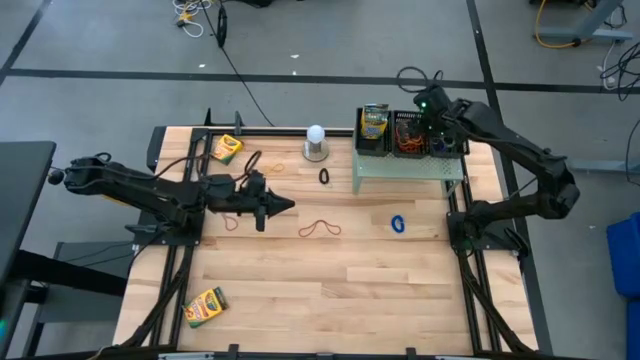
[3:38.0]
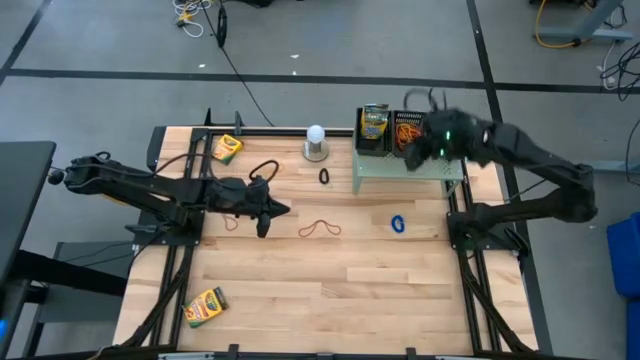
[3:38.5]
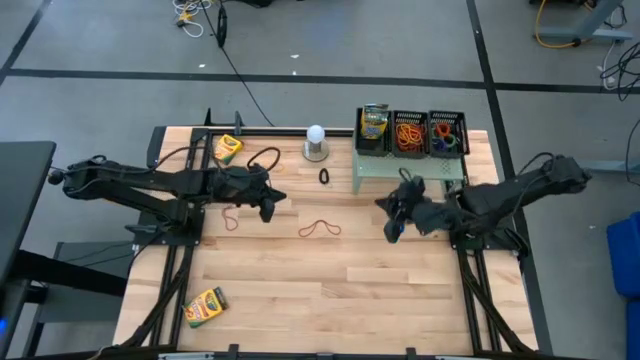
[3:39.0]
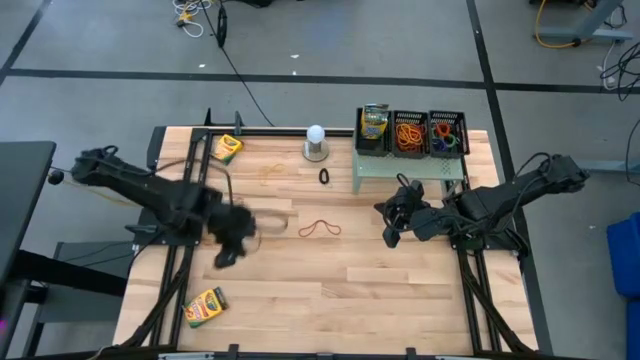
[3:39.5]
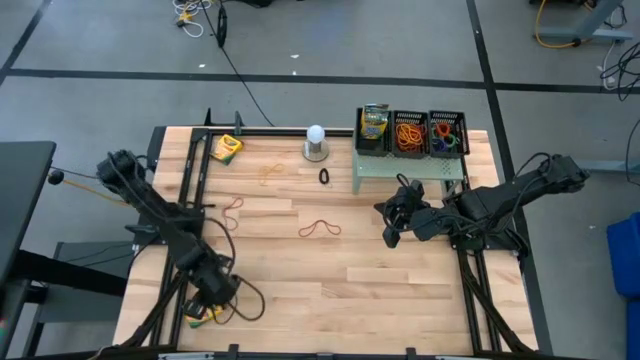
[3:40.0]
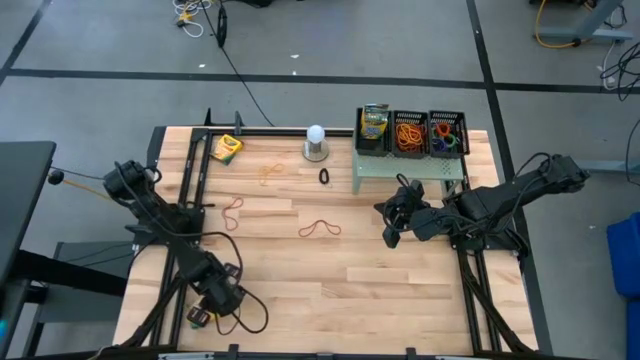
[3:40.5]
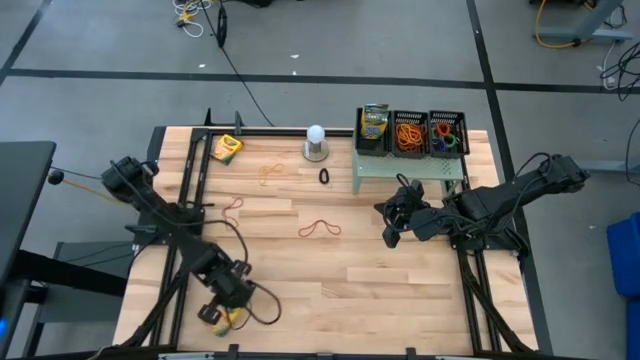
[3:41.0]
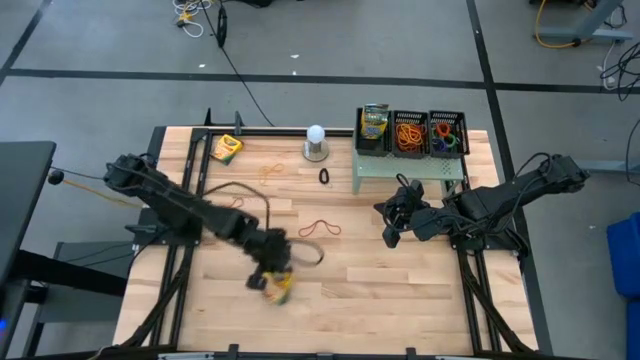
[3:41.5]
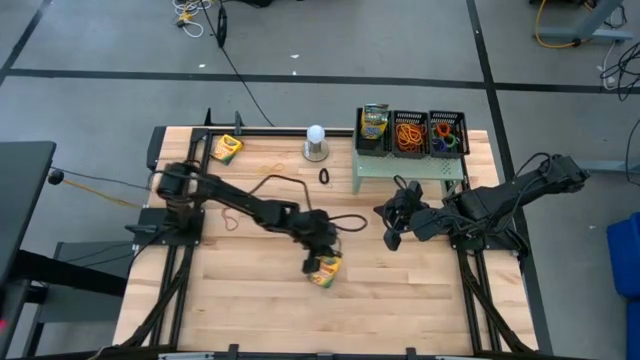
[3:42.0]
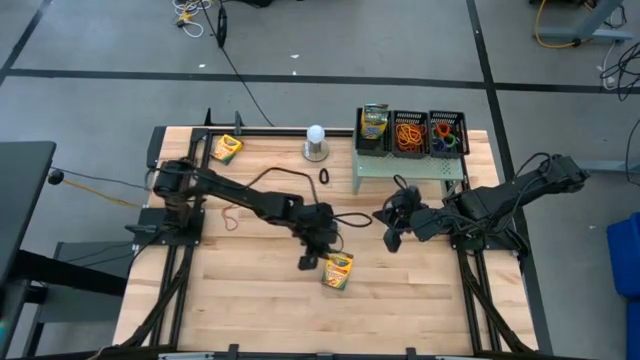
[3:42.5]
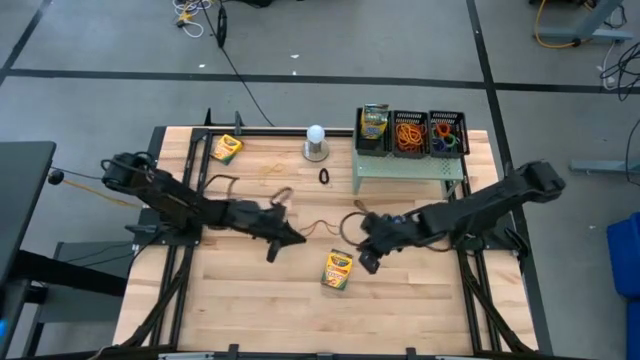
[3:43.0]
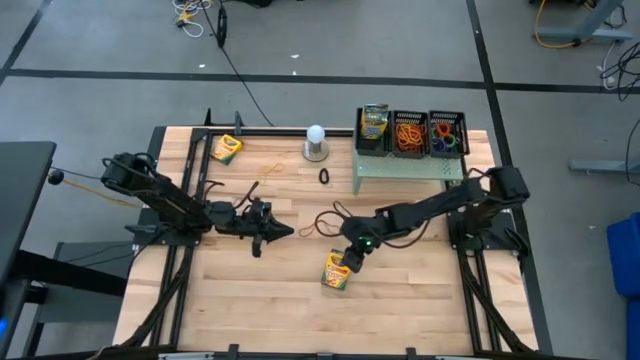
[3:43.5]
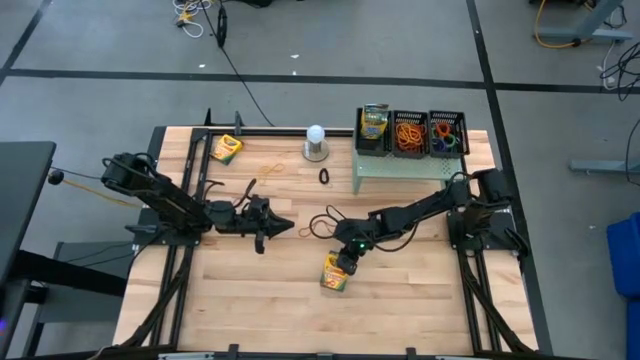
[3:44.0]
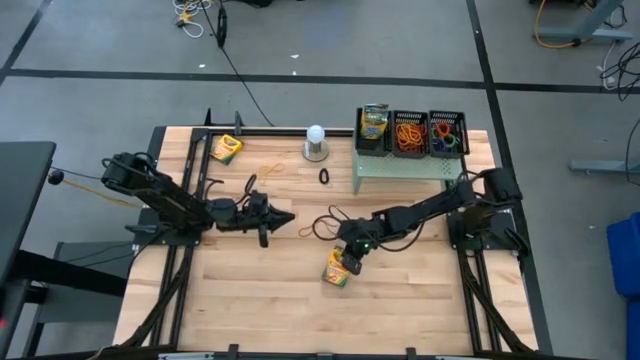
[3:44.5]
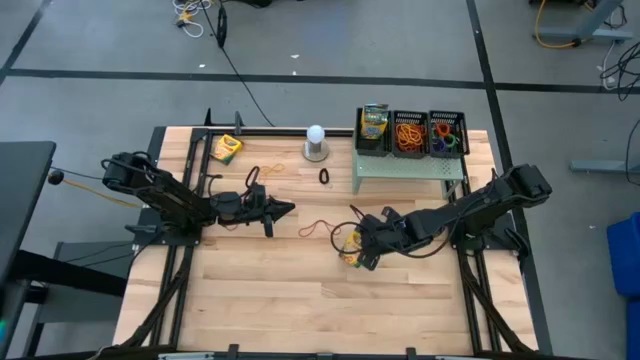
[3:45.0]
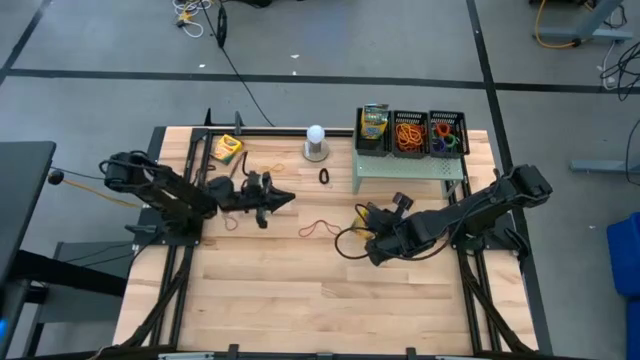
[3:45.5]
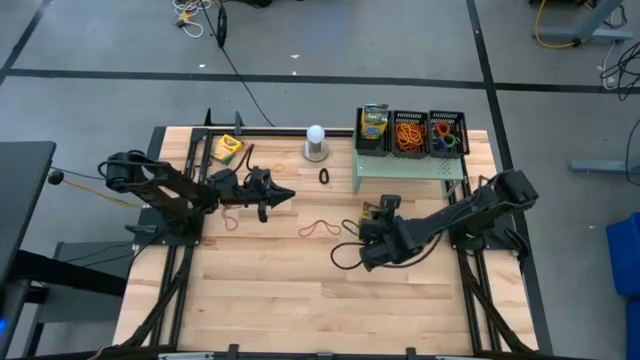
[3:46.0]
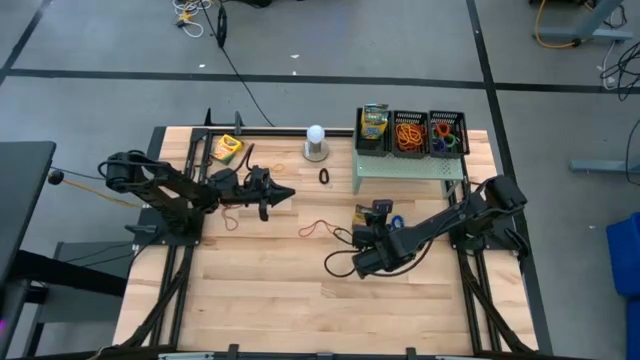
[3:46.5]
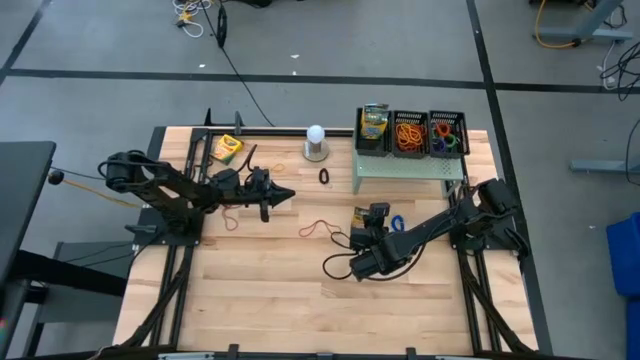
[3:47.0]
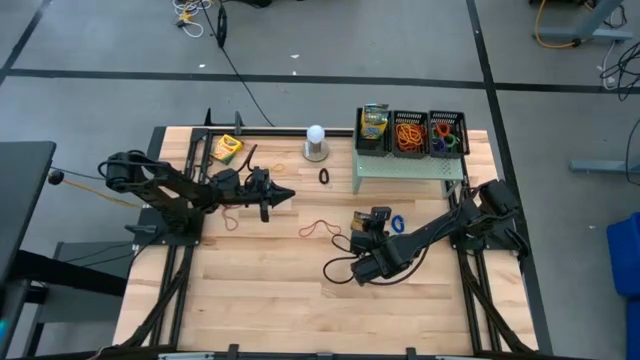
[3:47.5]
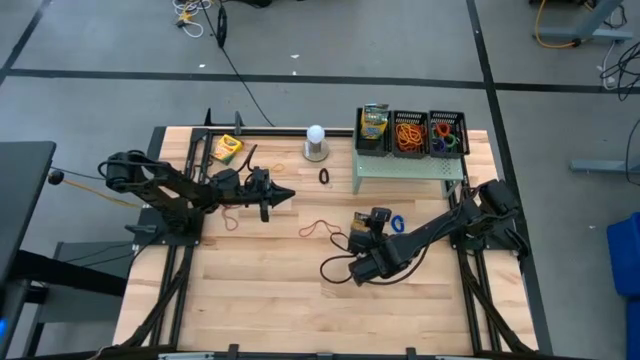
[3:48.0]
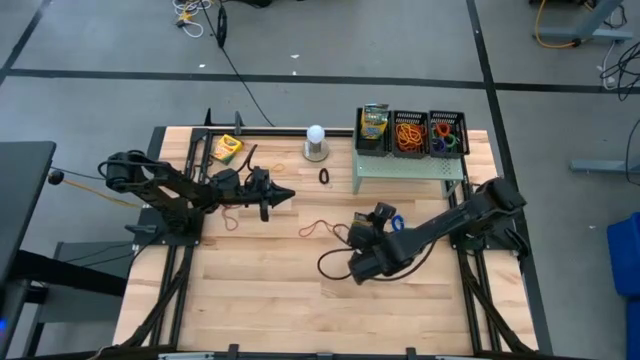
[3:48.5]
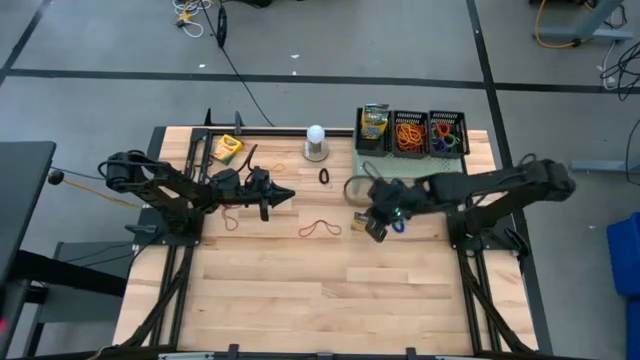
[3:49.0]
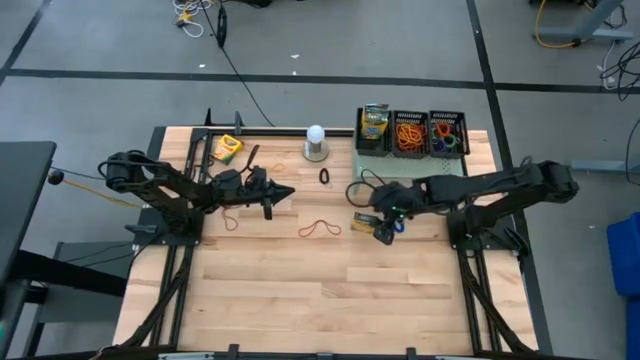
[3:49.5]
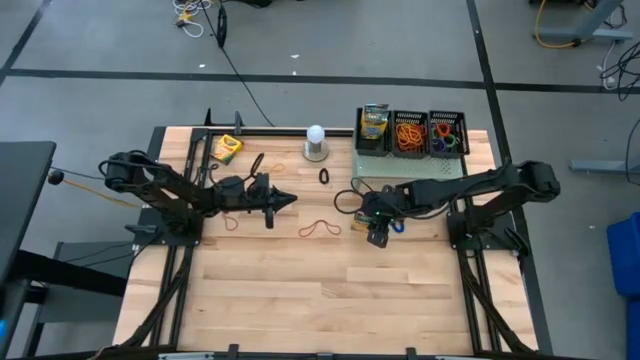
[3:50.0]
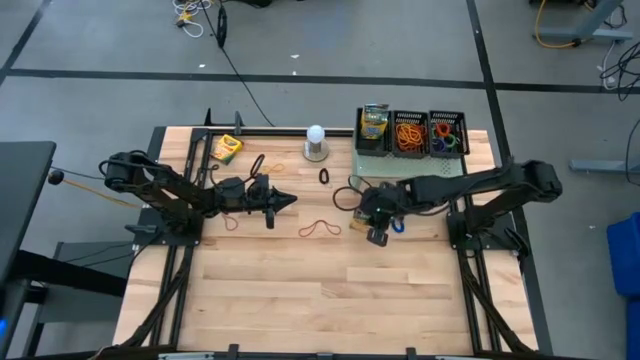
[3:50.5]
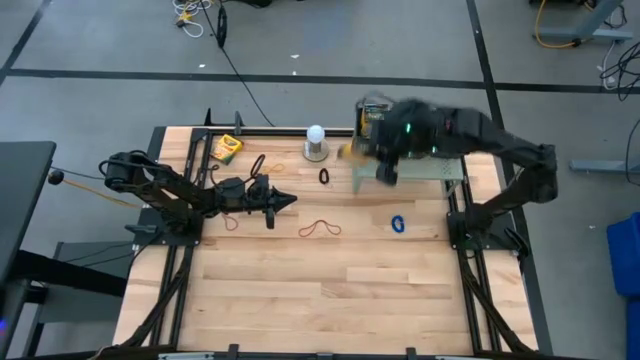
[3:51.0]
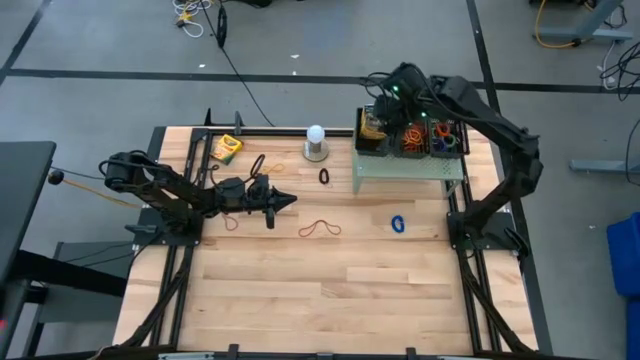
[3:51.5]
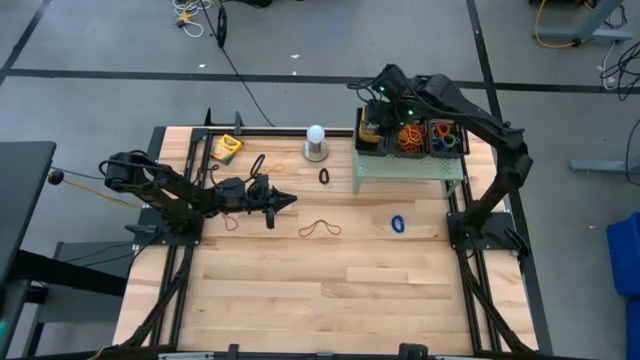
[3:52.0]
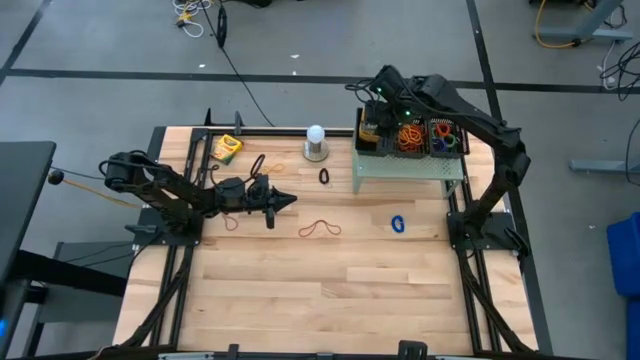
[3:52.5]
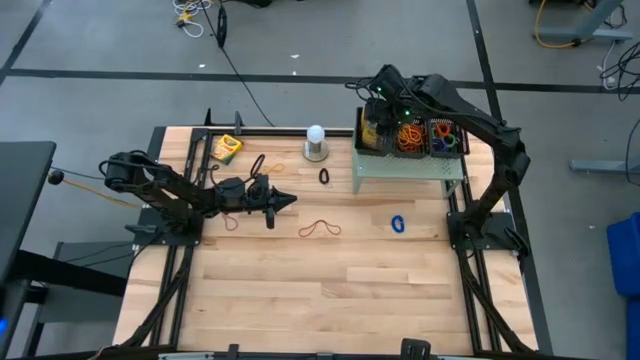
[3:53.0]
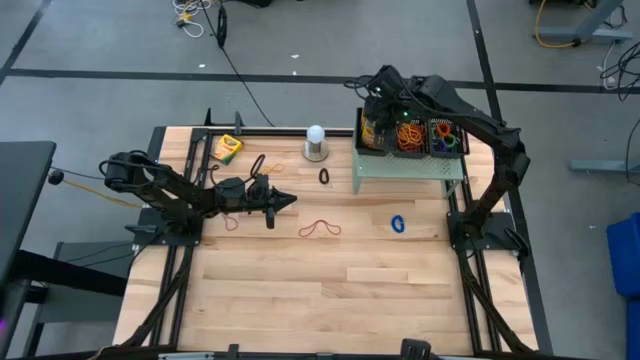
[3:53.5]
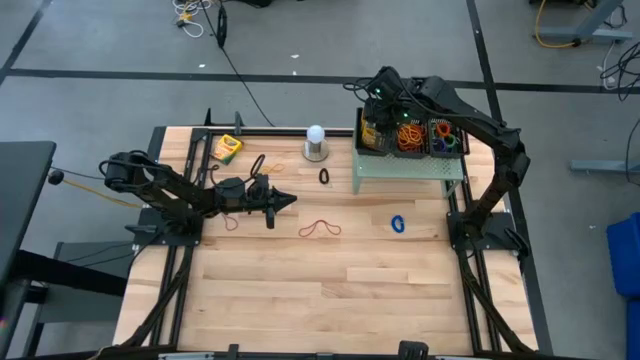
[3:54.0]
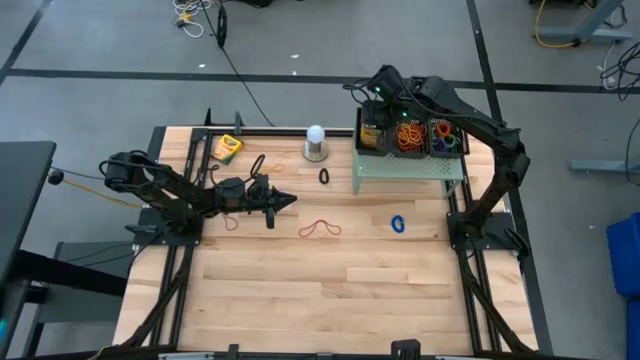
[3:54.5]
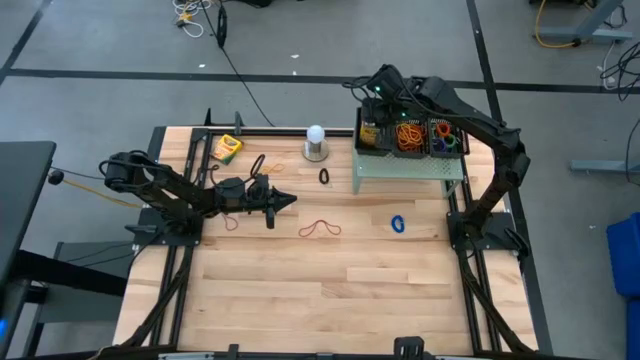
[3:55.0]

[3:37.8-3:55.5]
Task: Pick & Place Office Desk Supplies
Put the bottom crayon box into the left basket on the shelf

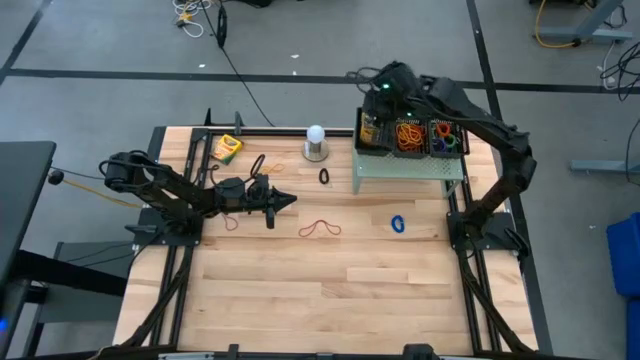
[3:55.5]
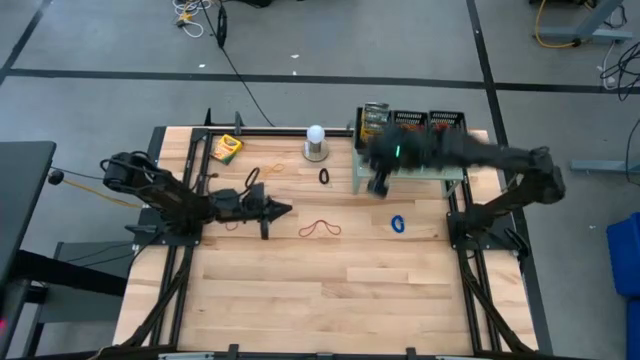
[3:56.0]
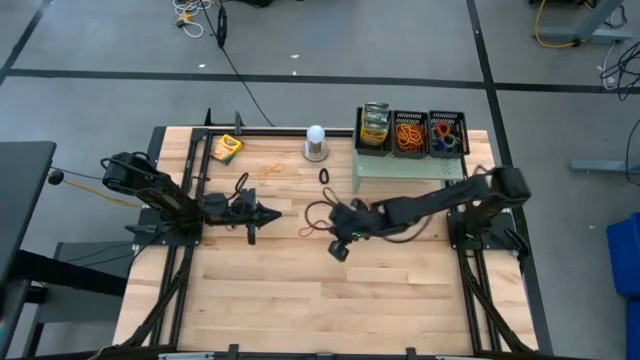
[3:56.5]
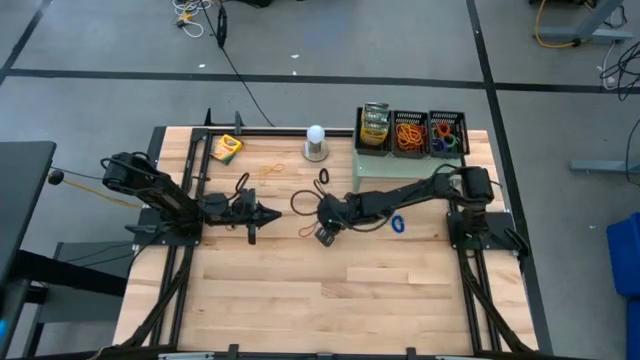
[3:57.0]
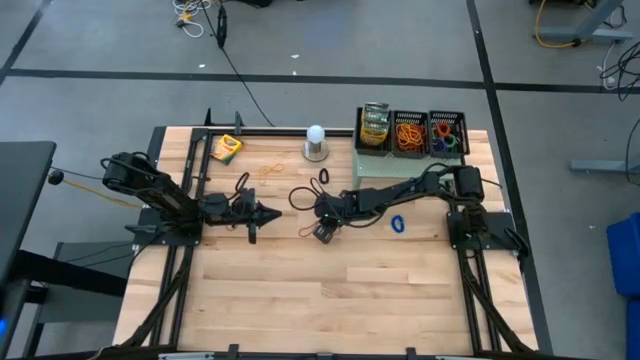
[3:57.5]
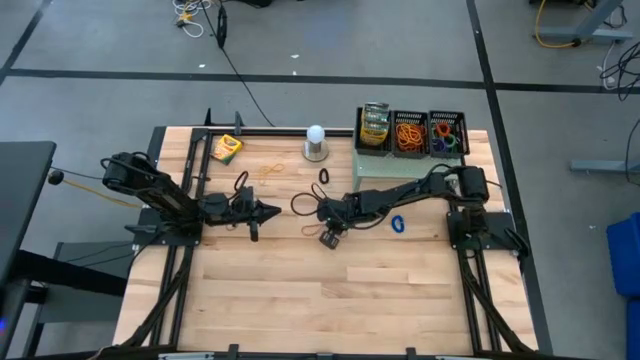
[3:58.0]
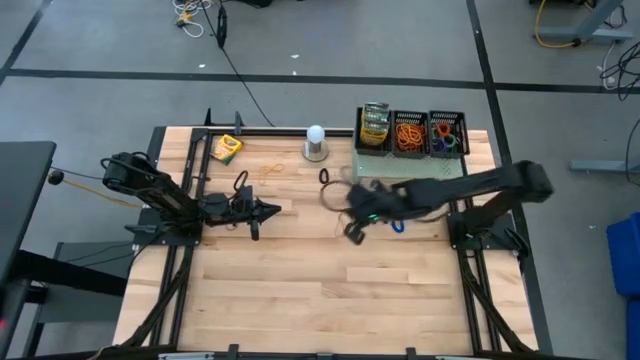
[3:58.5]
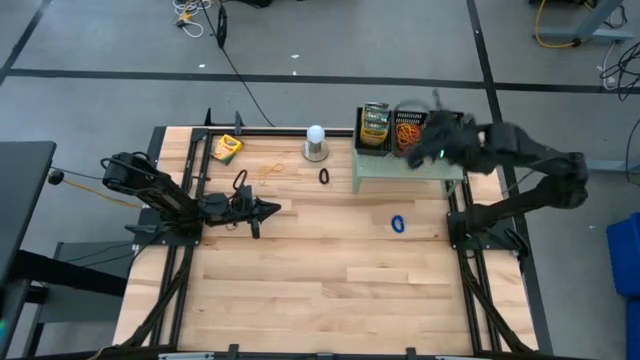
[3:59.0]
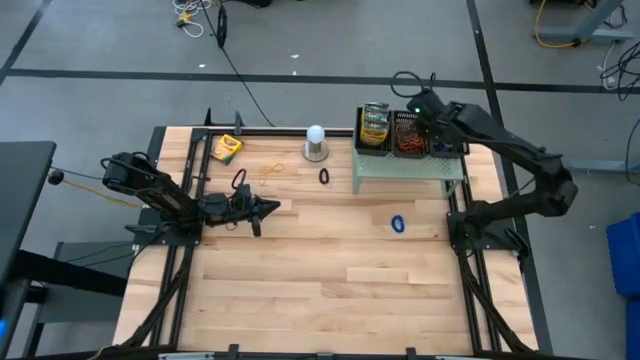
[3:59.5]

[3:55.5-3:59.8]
Put the right red rubber band into the middle basket on the shelf

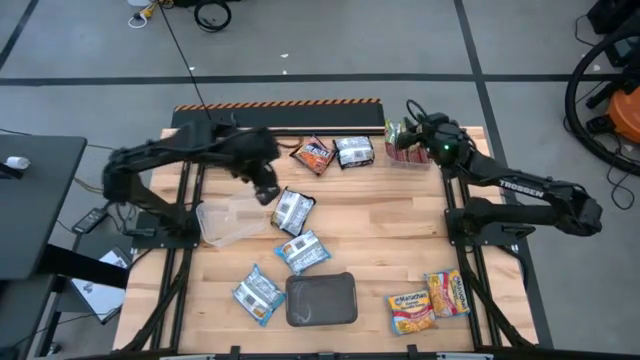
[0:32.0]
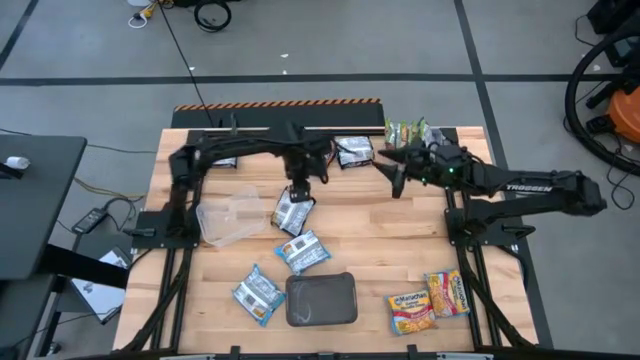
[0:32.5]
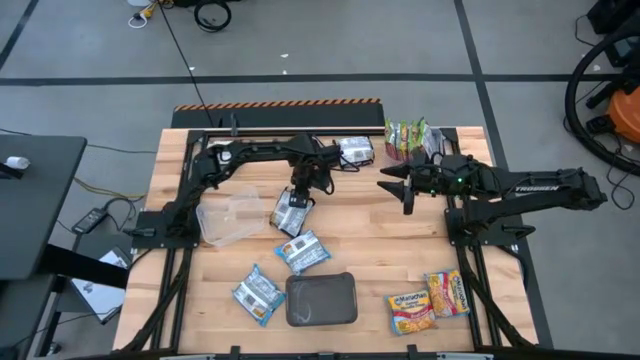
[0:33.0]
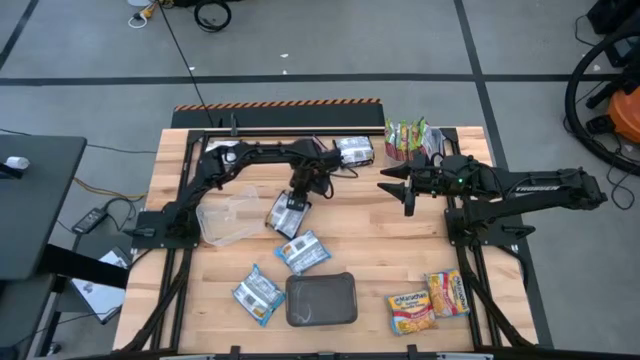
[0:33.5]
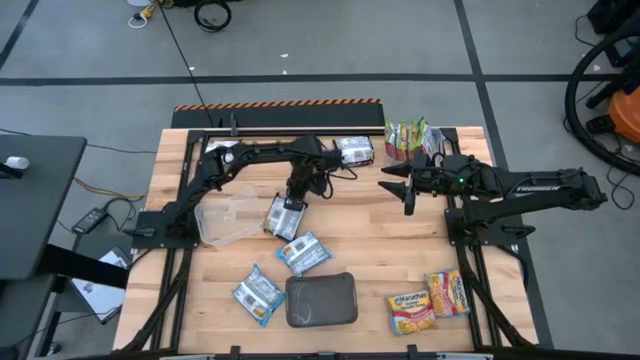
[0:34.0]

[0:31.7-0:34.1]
Task: Sort Maruchan noodles
Put the black noodle pack into the bottom transparent bin
